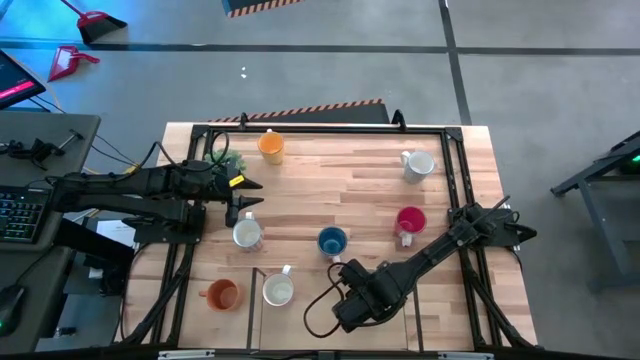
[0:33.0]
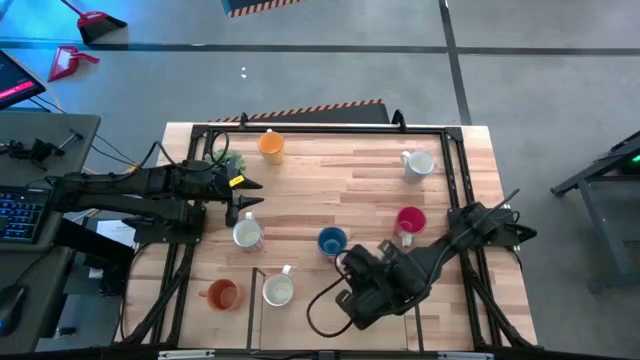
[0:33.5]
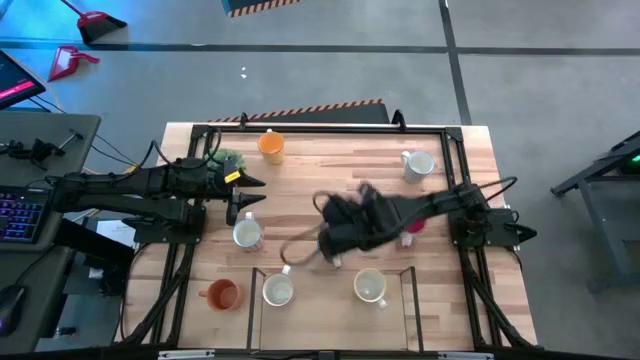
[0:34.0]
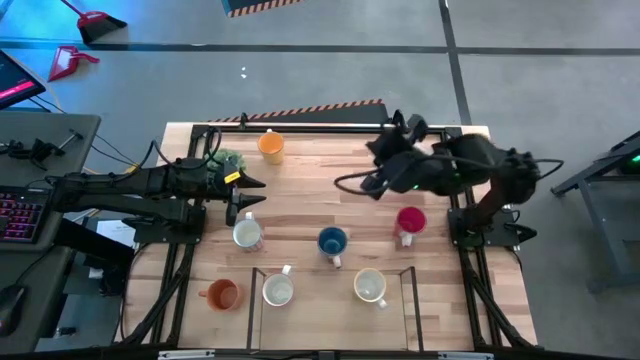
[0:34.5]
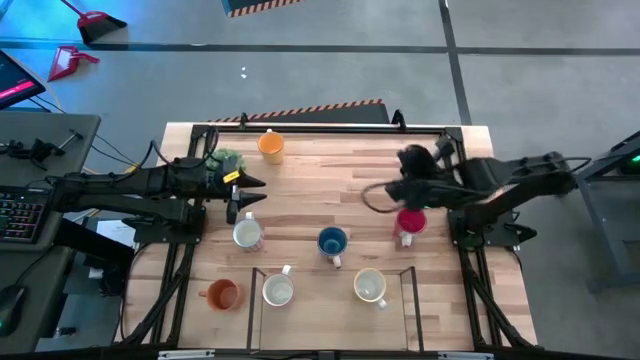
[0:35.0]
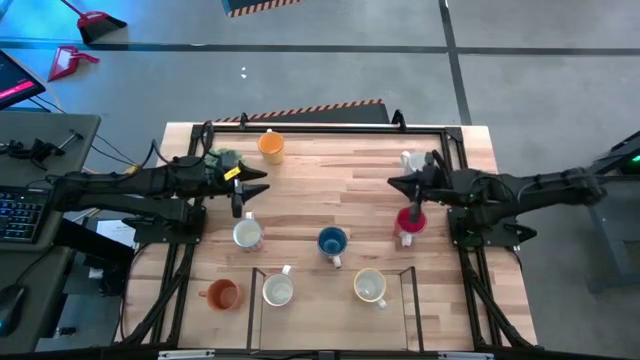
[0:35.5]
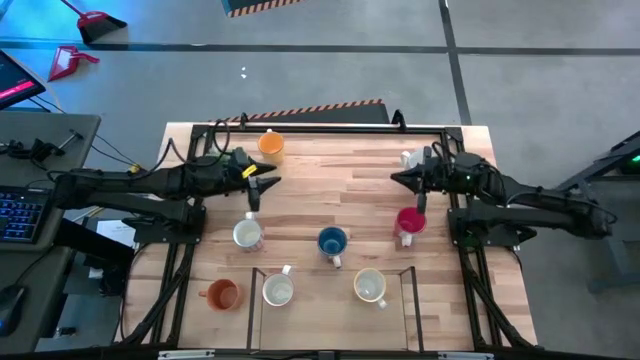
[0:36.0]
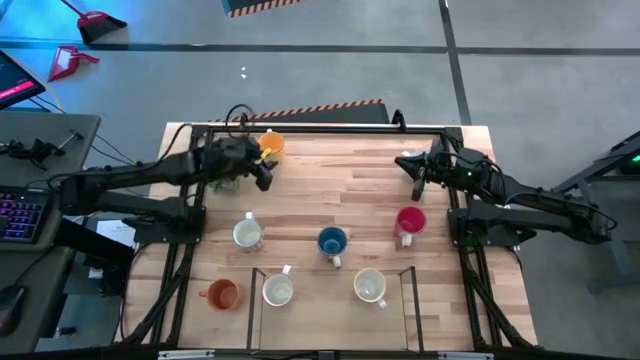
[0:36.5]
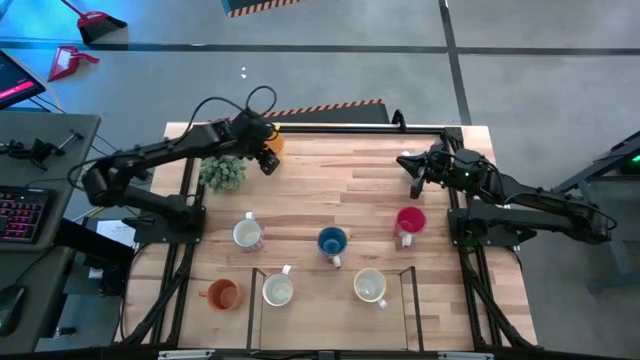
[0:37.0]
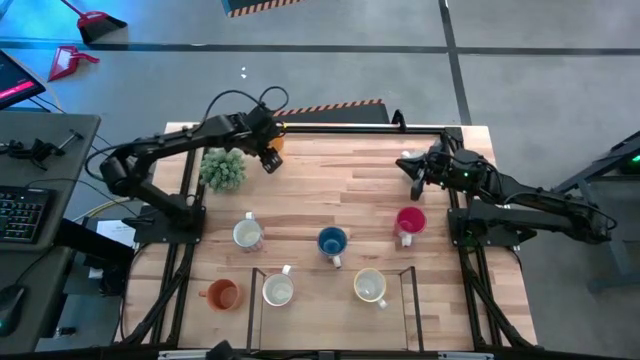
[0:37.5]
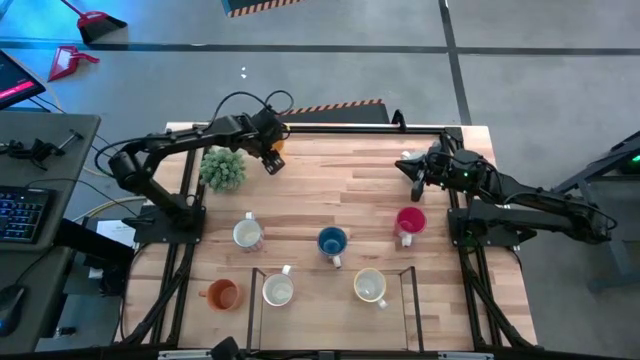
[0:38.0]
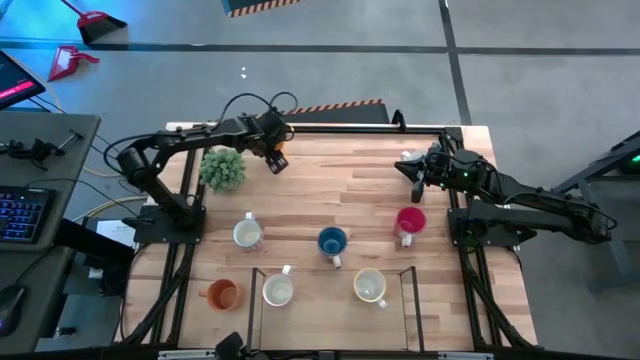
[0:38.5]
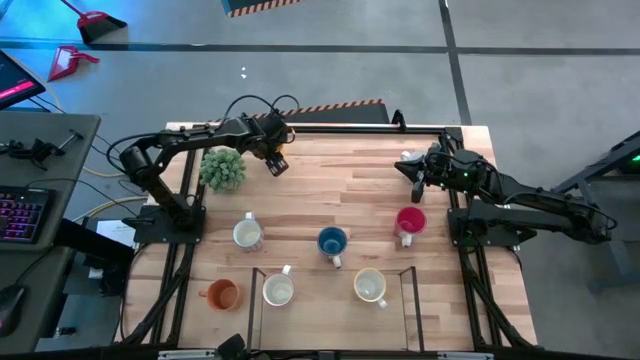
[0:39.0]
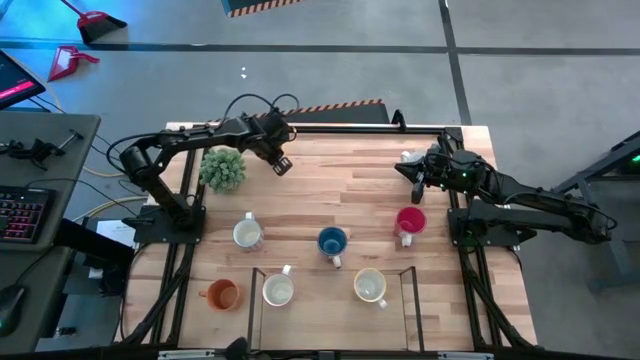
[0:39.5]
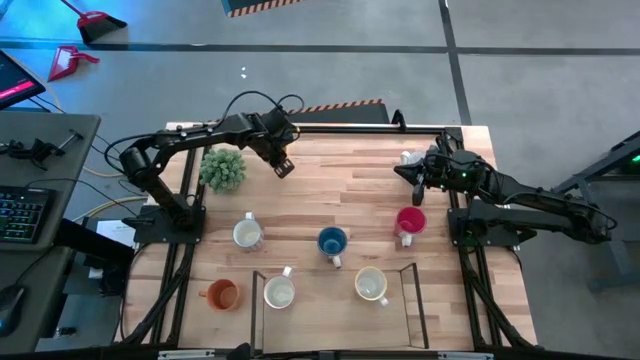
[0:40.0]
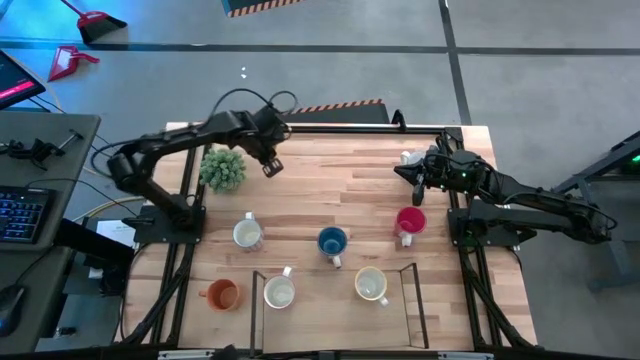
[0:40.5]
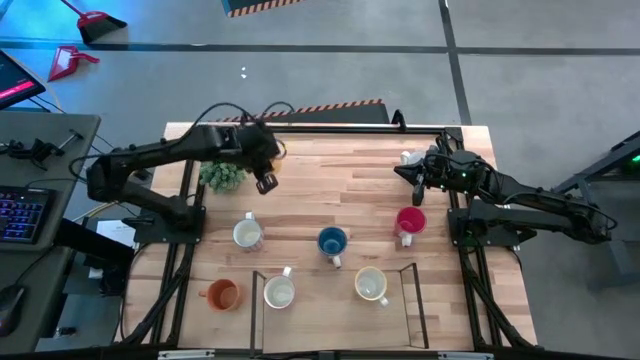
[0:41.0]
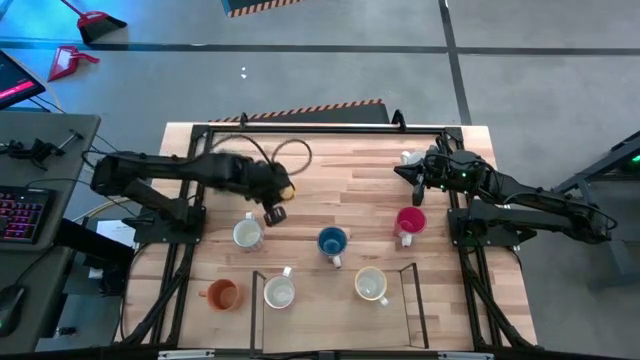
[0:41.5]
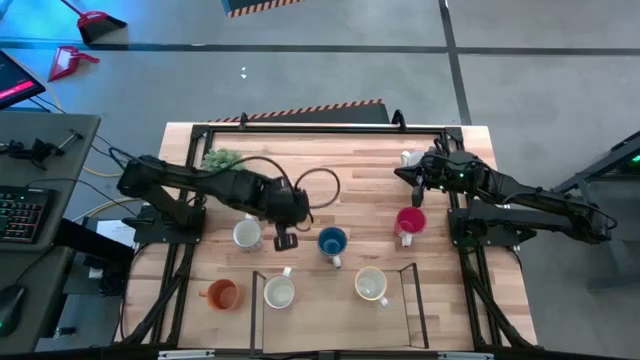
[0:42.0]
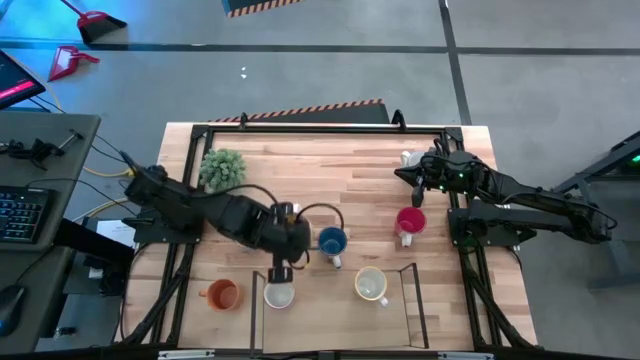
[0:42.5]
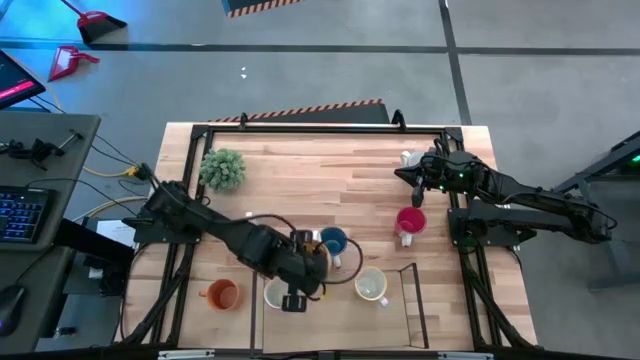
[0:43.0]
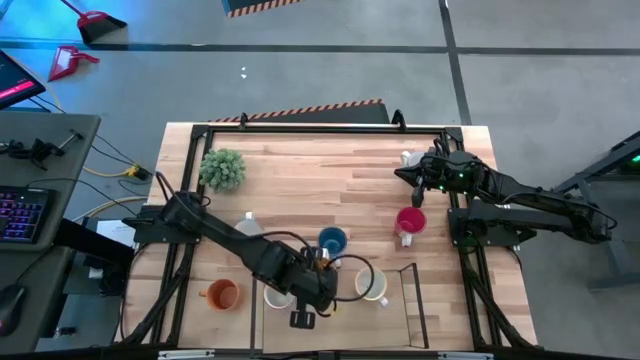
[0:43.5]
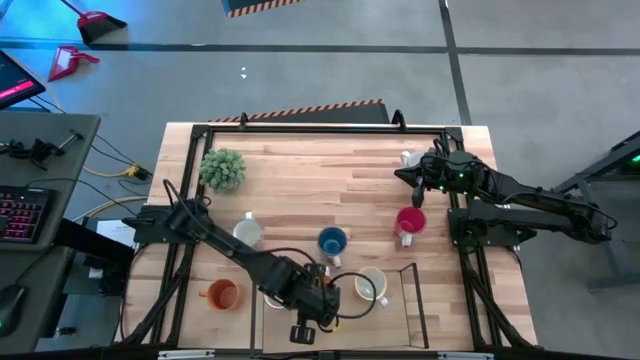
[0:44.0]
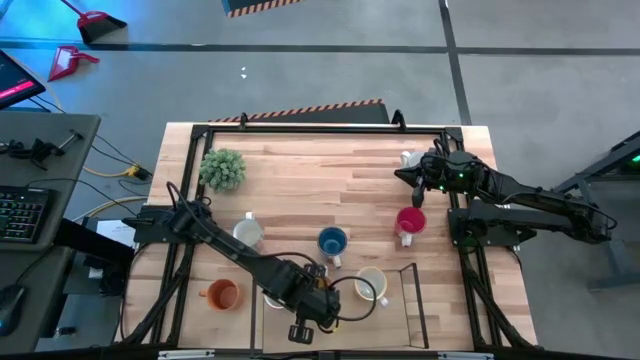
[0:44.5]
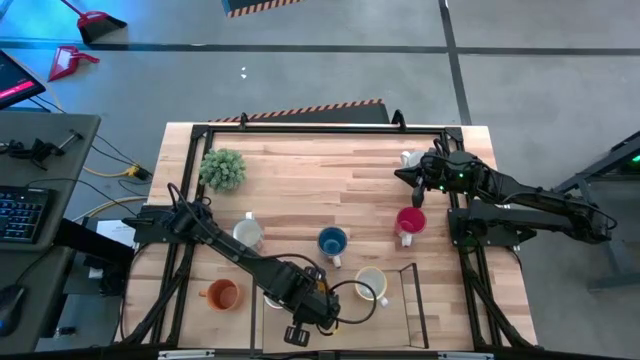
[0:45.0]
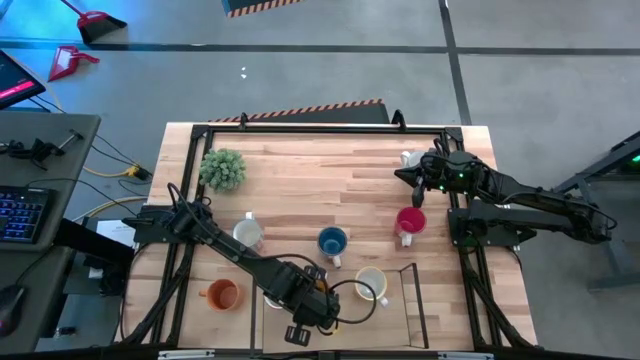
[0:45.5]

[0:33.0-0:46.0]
Task: Place coffee mugs
Put the orange mug on the shelf

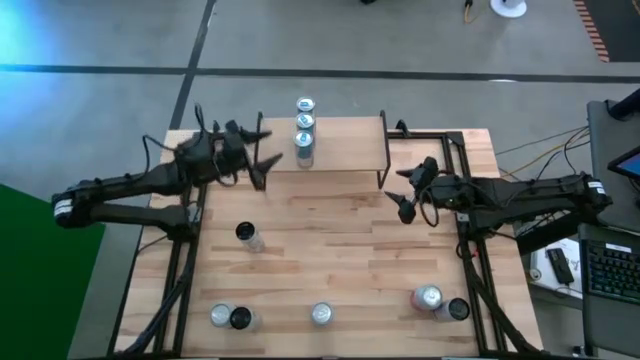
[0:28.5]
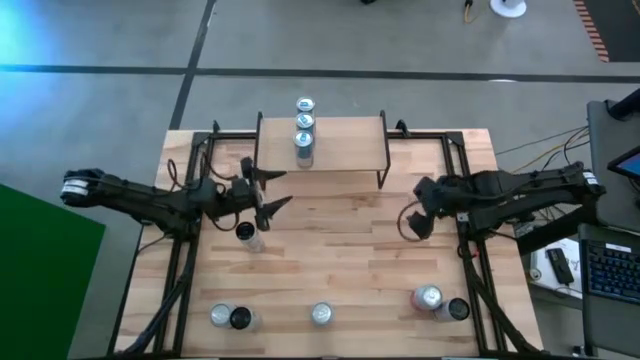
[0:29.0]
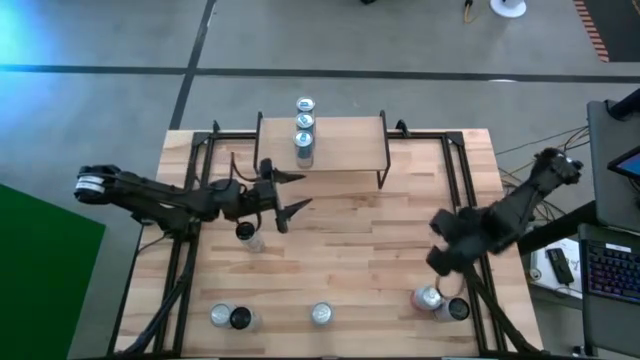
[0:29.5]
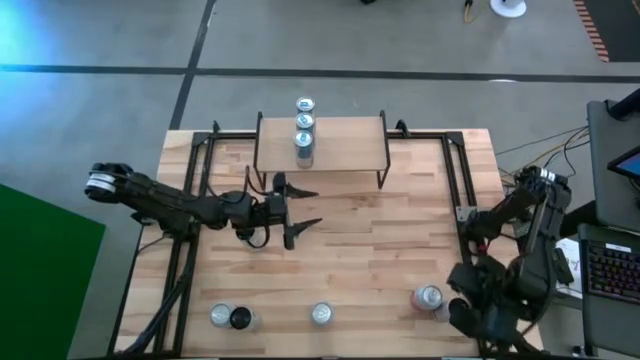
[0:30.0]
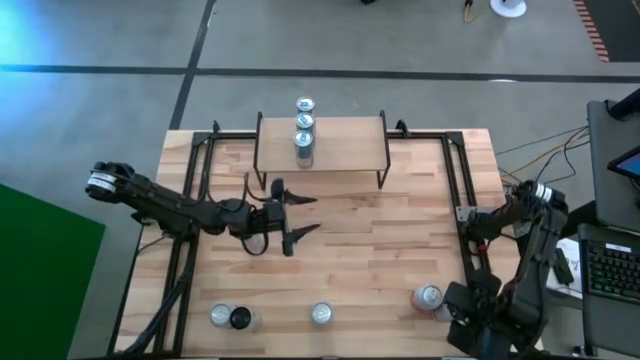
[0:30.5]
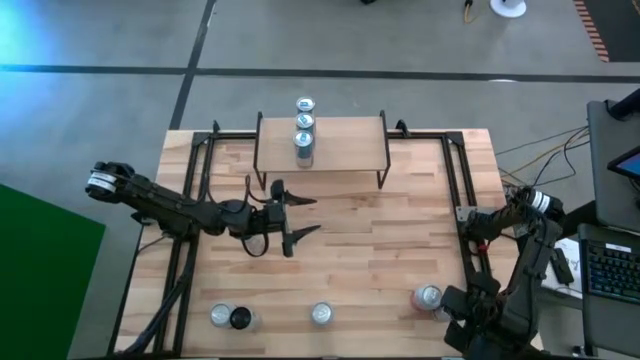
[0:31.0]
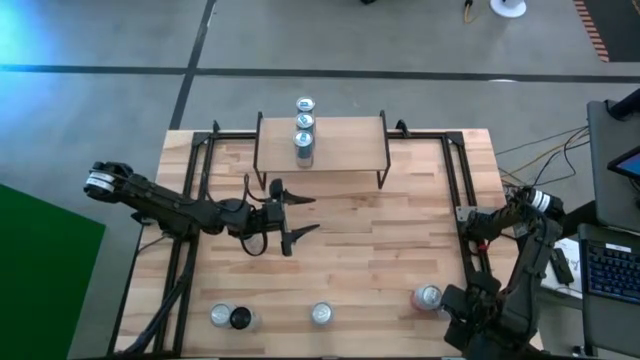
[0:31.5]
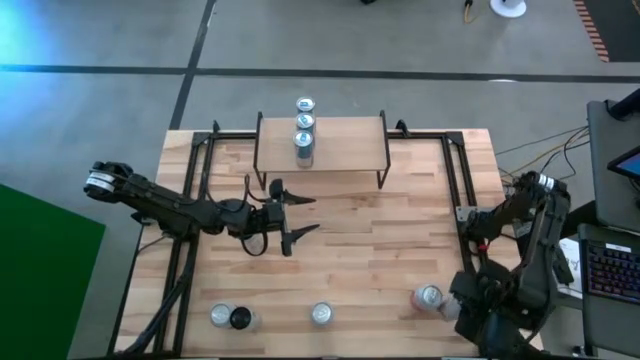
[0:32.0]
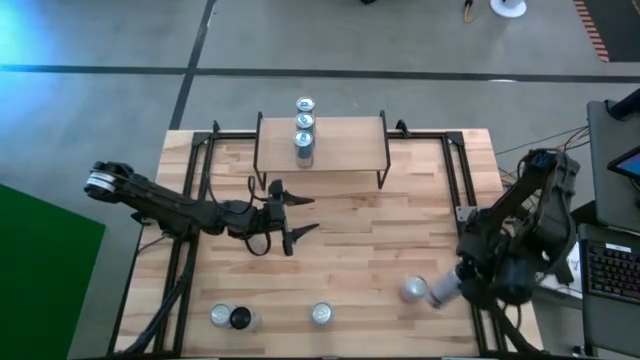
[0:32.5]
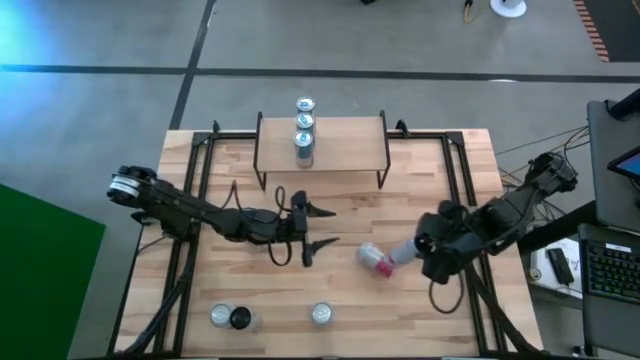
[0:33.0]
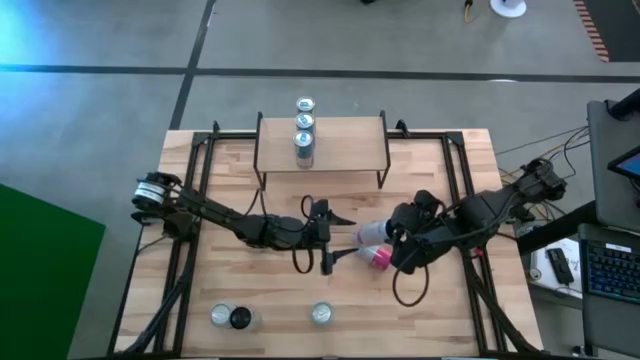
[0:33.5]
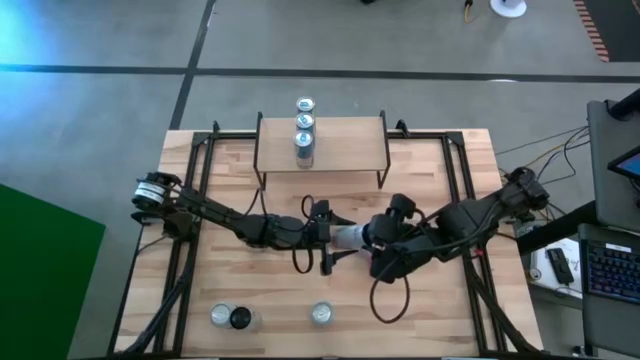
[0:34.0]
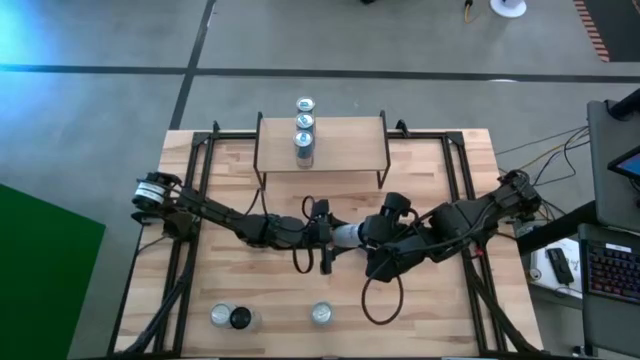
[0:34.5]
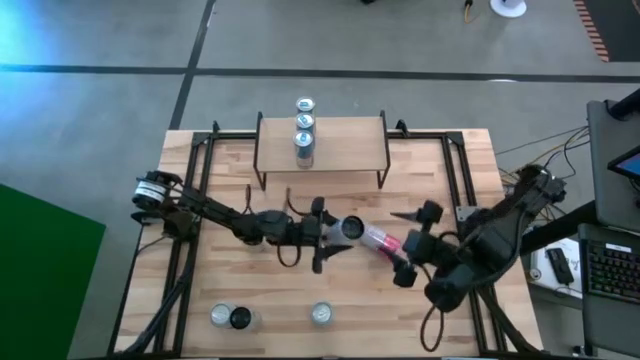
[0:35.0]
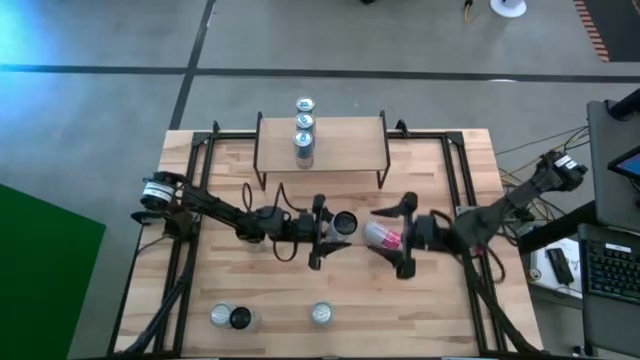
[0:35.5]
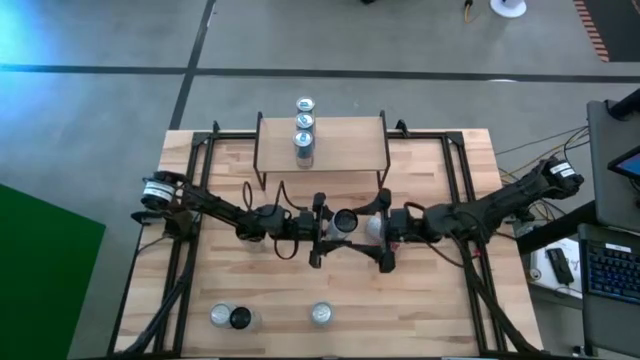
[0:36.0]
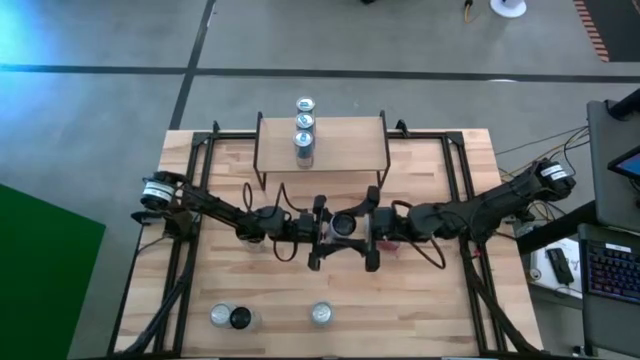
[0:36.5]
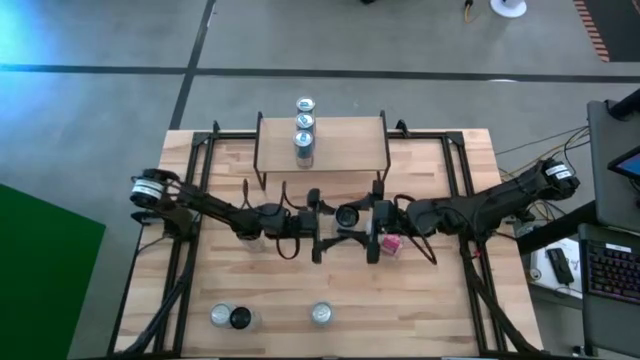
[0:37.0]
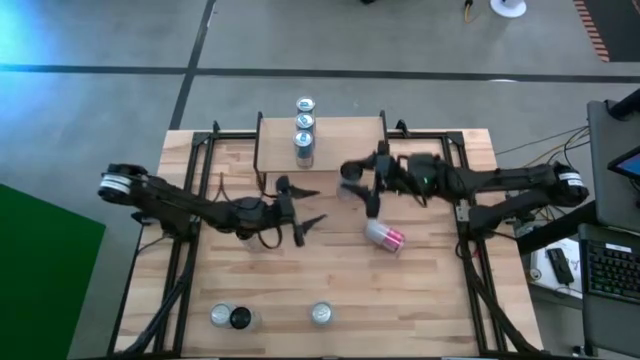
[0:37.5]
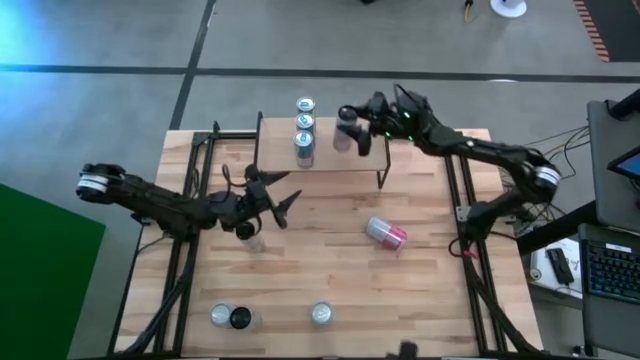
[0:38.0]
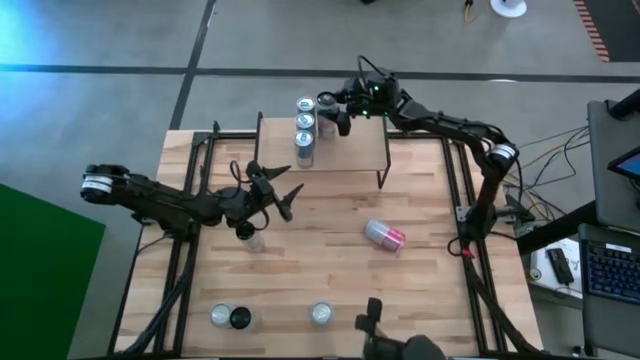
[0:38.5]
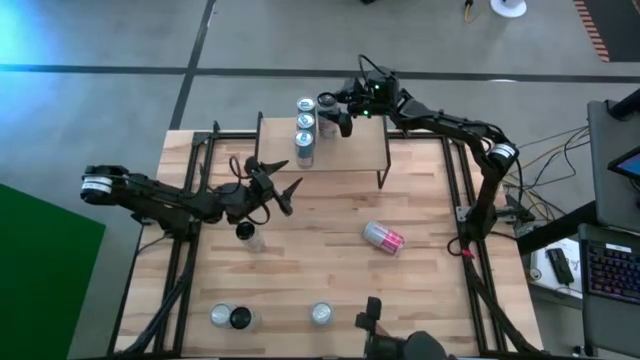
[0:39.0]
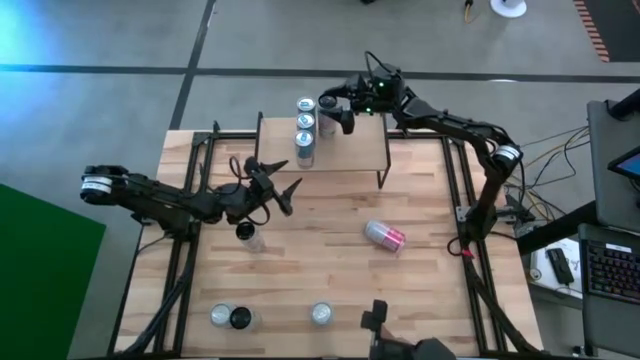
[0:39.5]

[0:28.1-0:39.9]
Task: Place canned beverage on shelf
Put the bottom right white-pink soda can on the shelf
